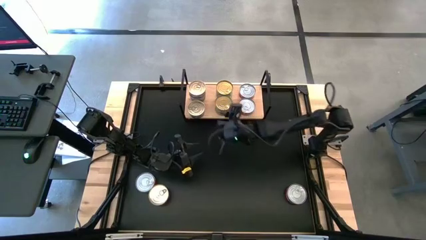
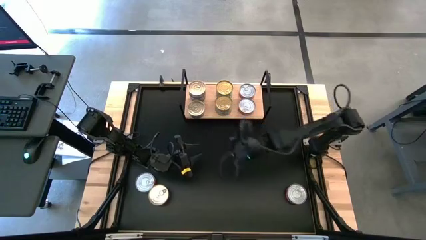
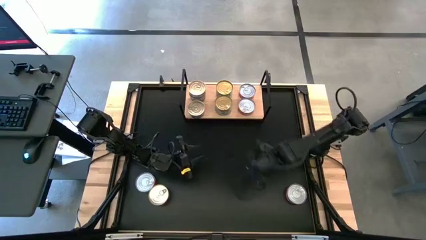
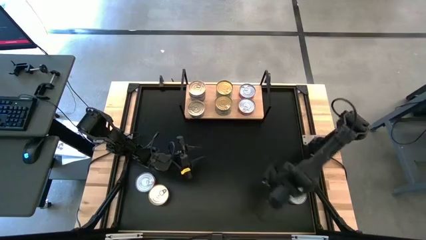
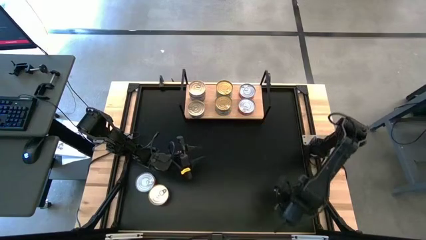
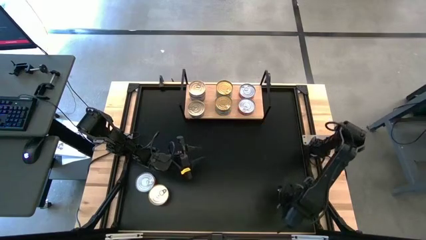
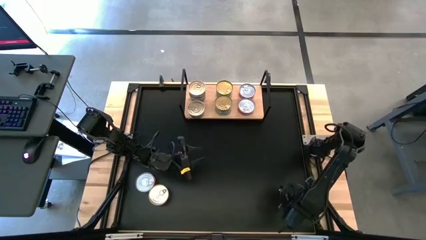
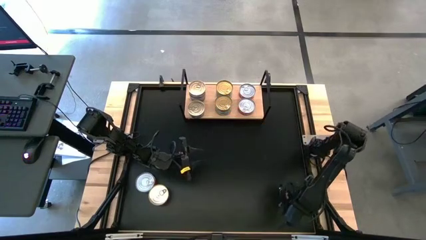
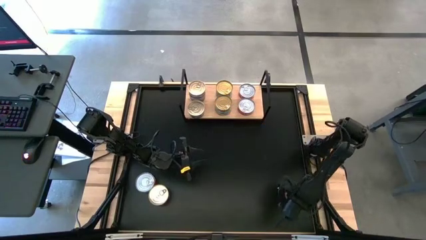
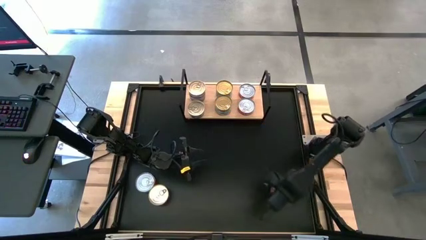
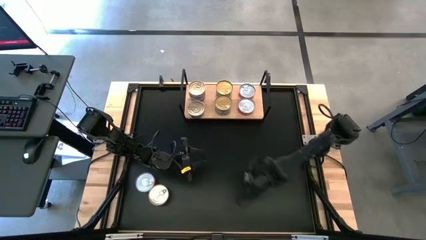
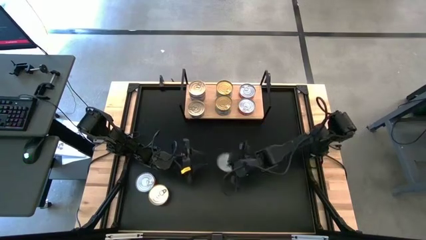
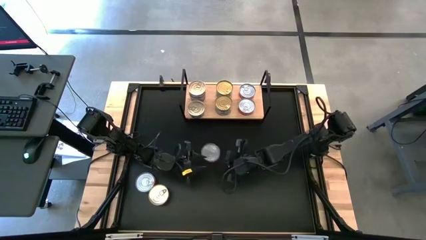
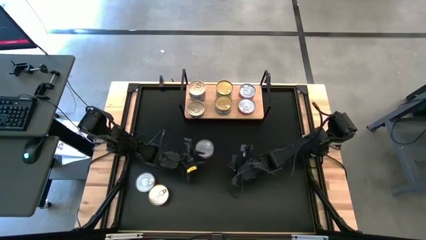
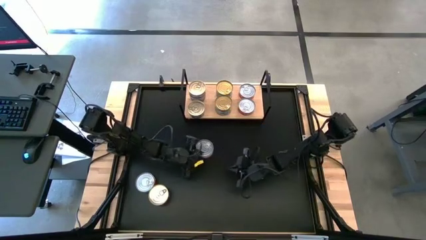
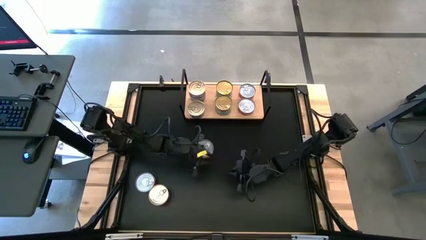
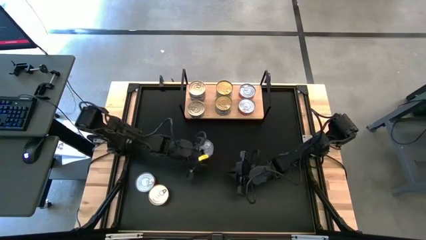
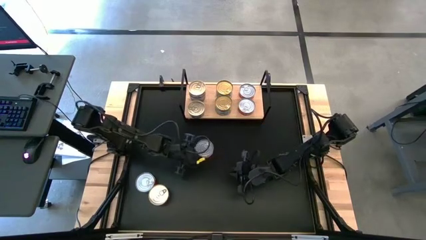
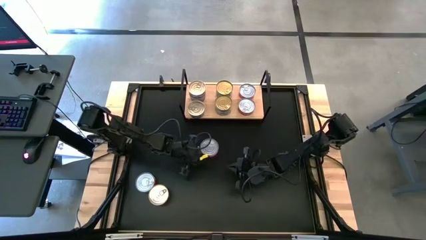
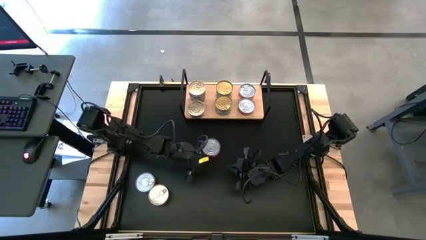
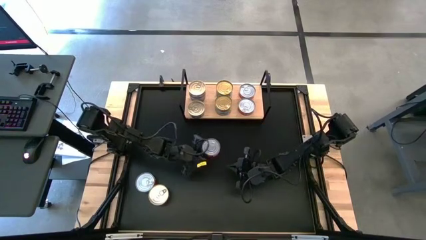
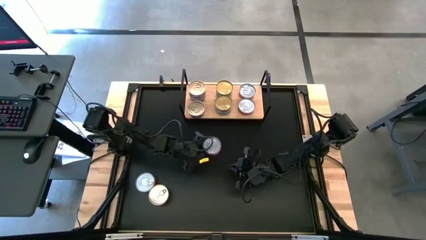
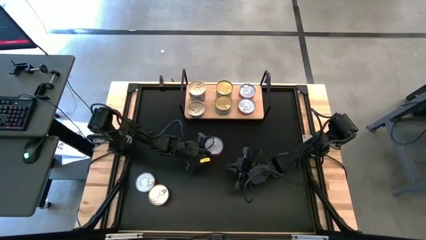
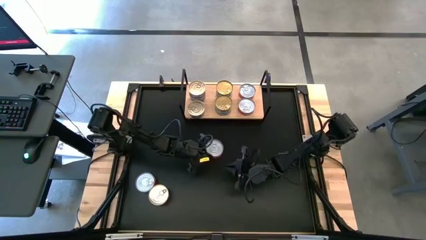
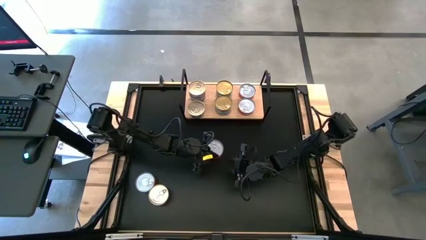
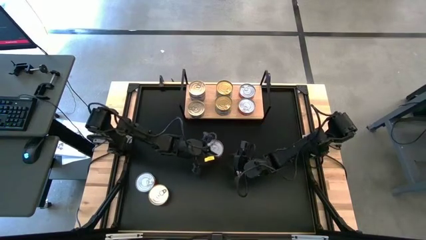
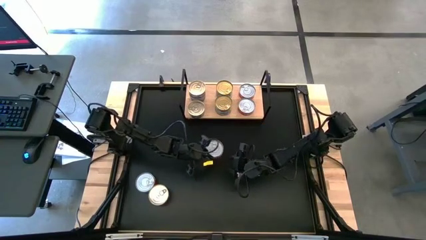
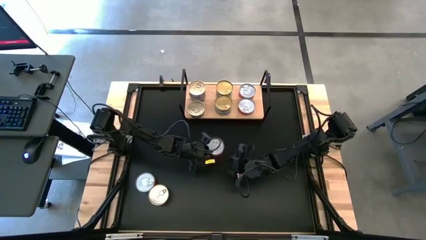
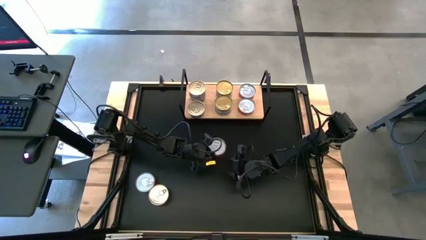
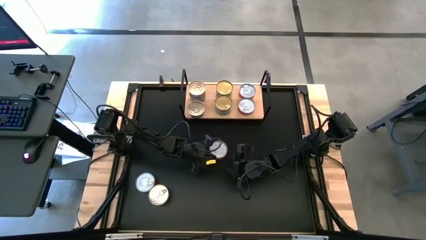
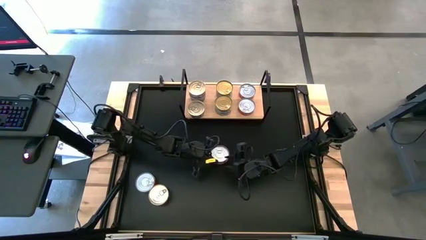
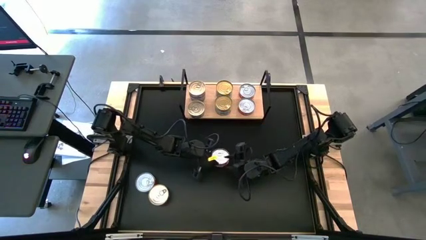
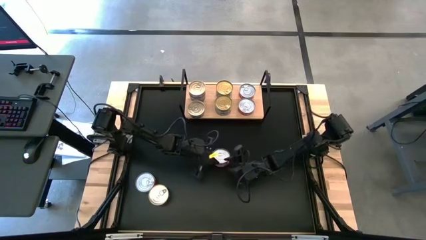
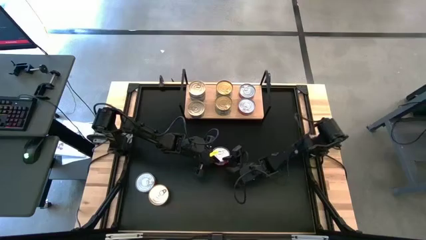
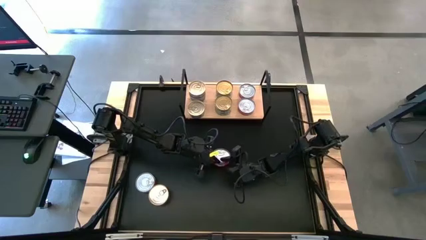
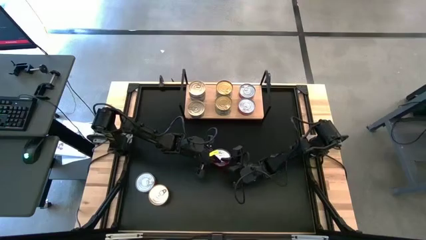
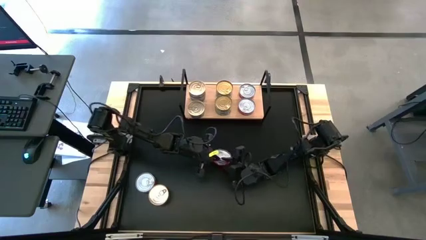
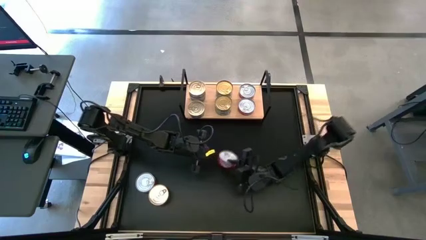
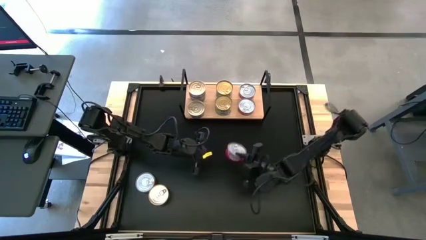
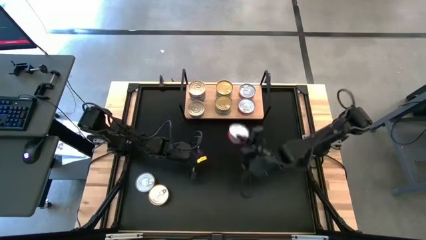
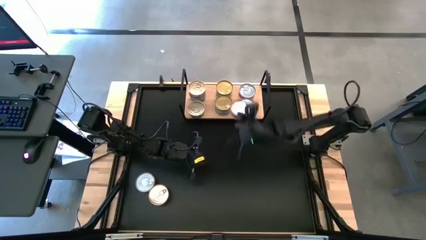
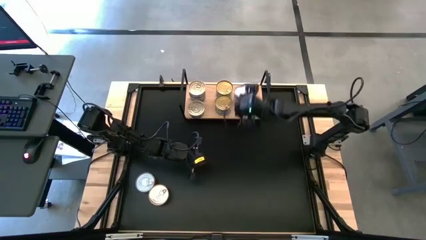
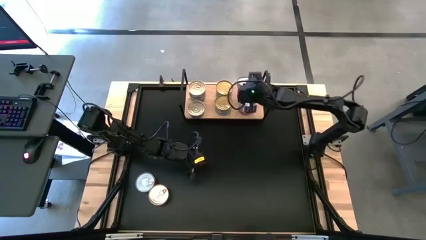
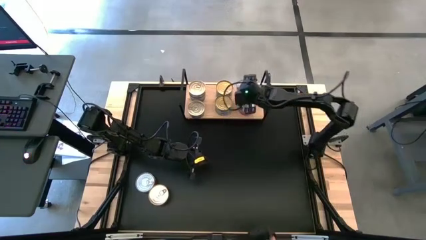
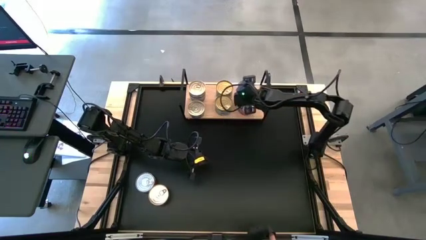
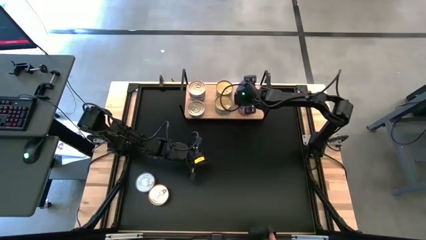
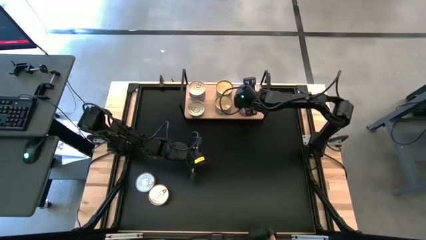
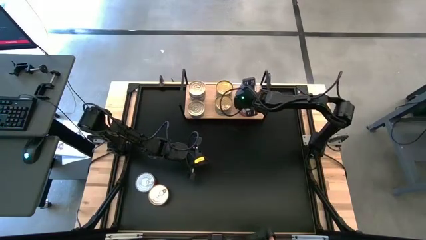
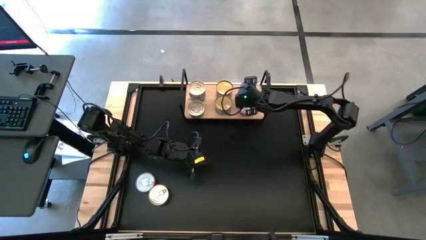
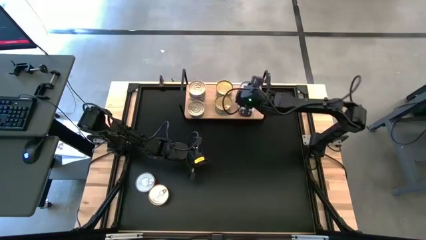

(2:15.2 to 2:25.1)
Task: Stack canned seafood by type on shelf
Stack the right red canned tuna on the top red canned tuna

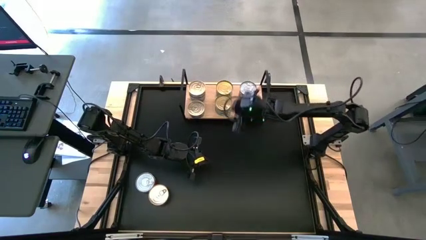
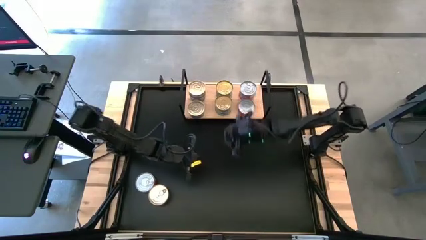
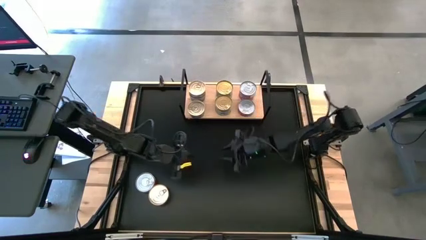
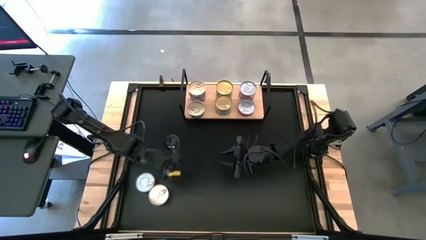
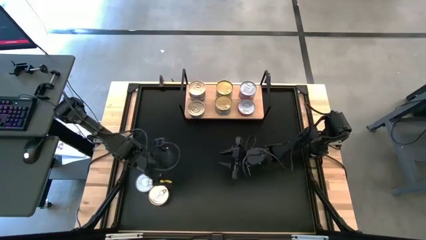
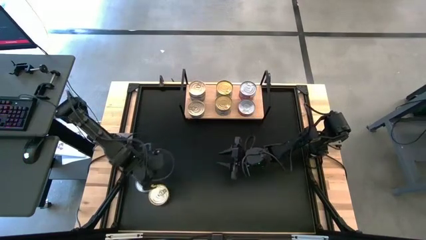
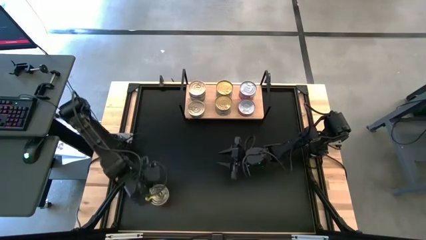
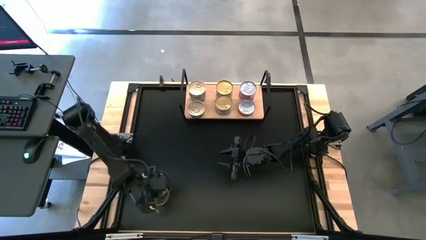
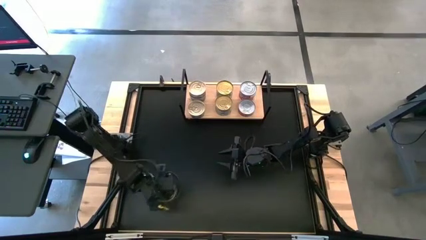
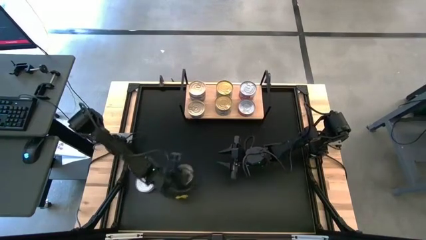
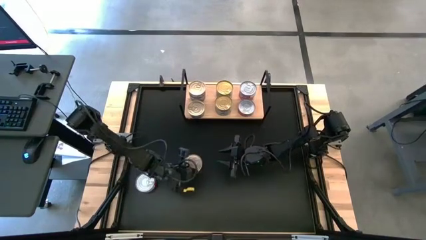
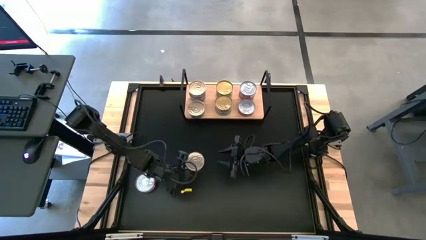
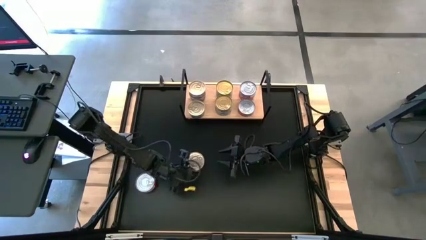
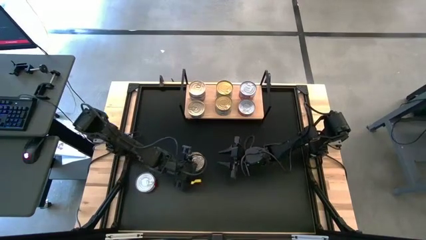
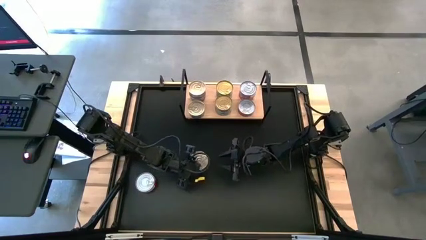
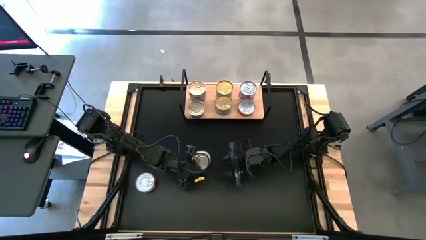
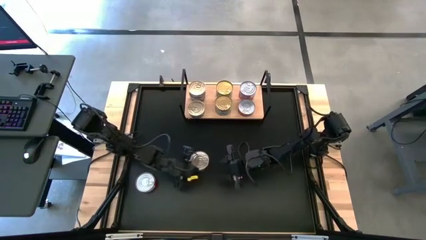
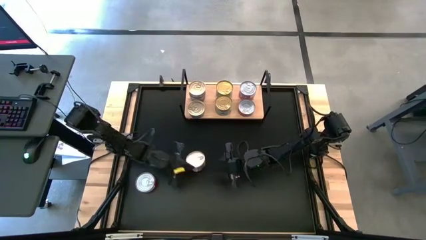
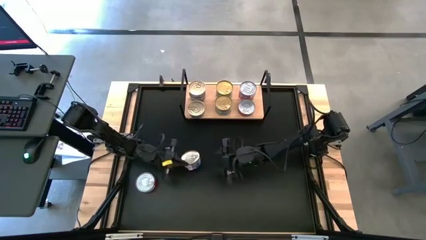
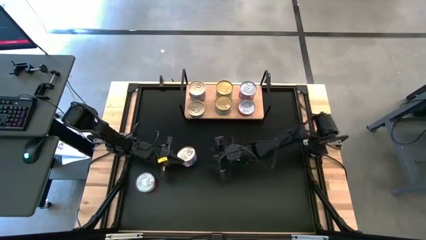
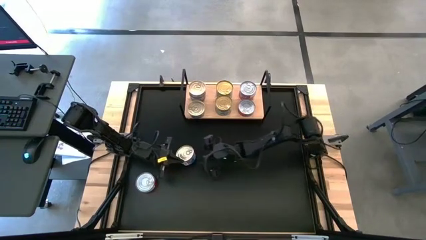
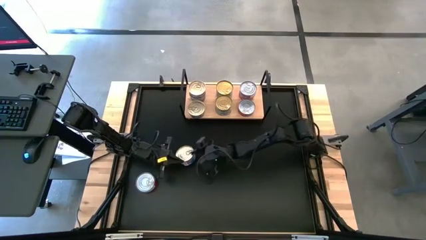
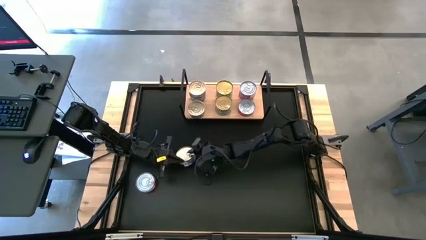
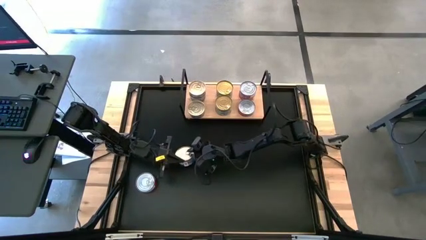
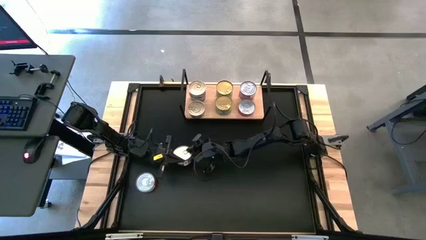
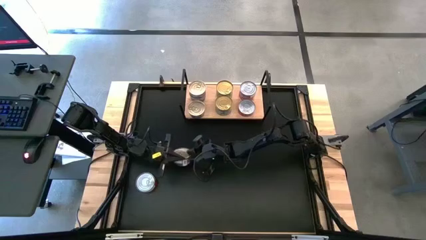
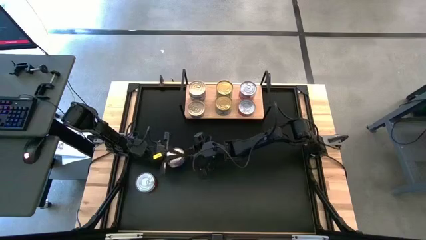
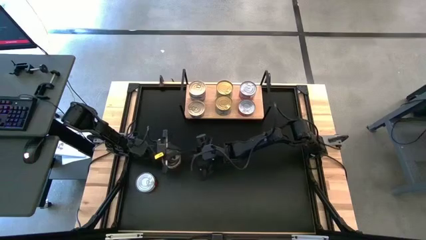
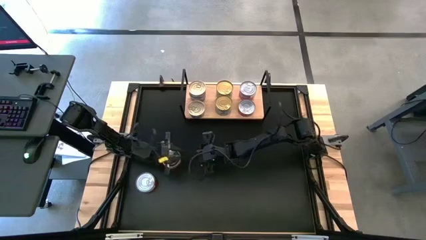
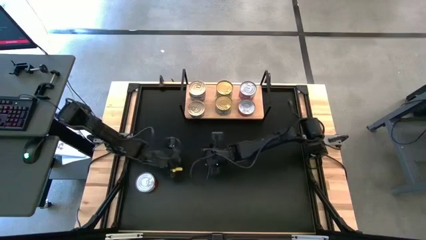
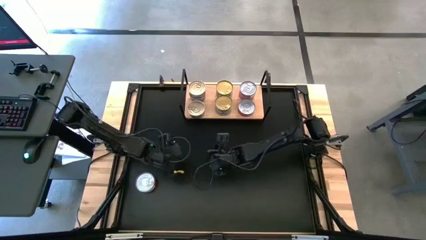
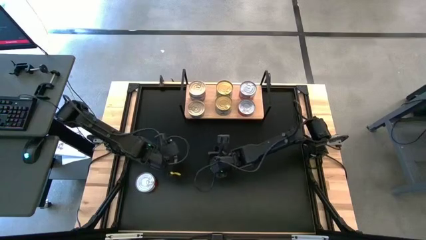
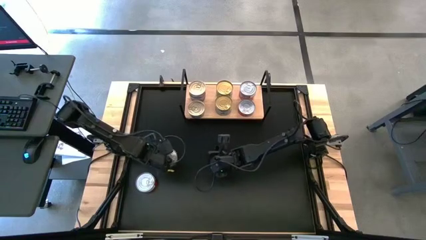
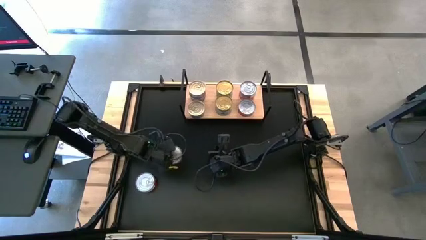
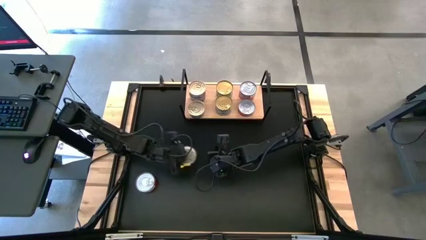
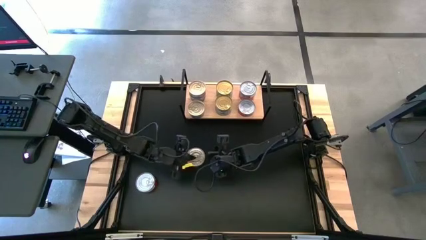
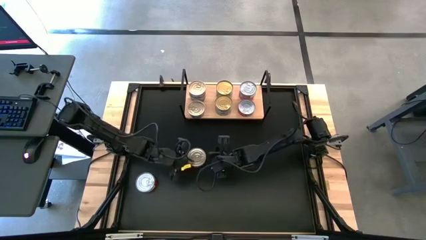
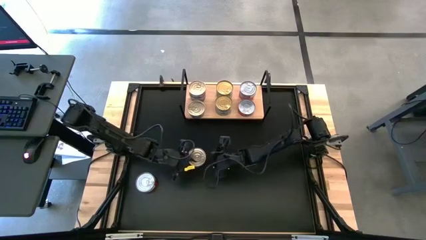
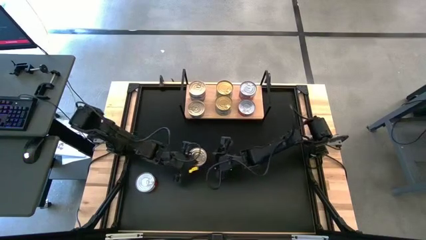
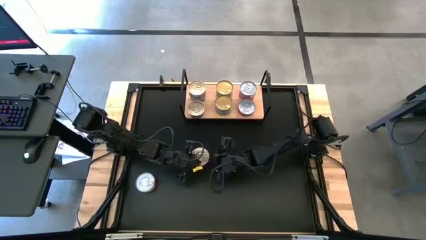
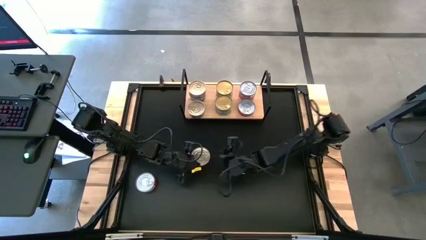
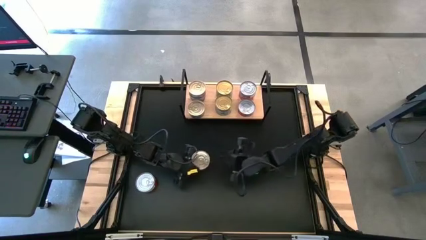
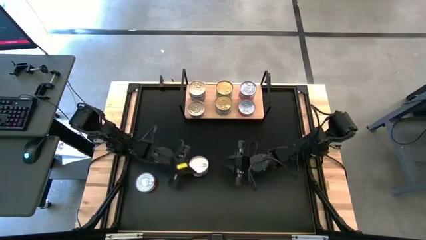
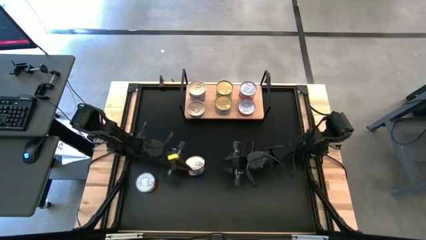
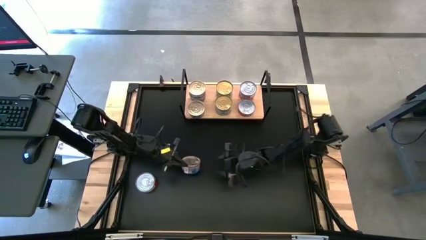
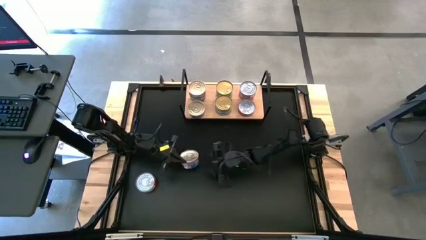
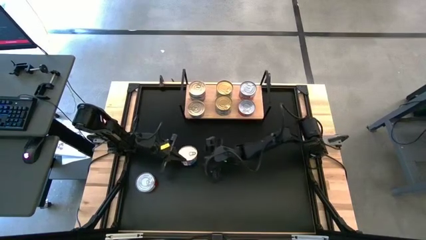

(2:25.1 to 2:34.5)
Stack the blue canned tuna on the bottom blue canned tuna
